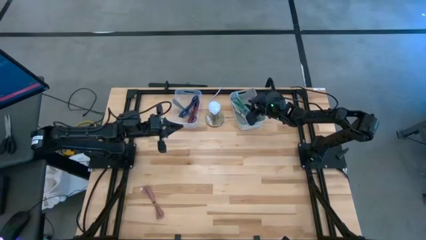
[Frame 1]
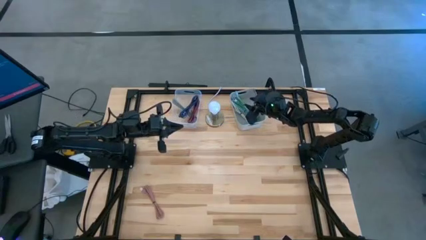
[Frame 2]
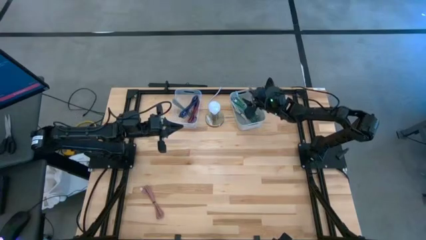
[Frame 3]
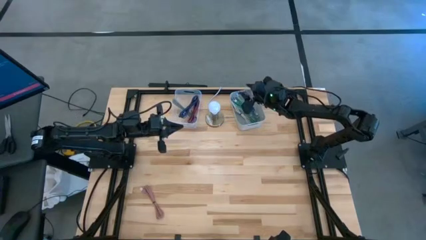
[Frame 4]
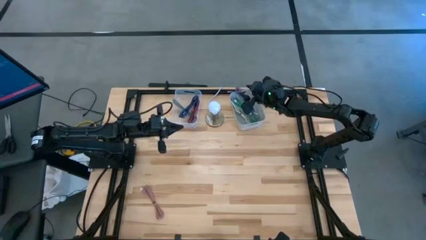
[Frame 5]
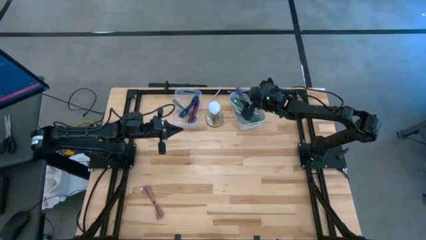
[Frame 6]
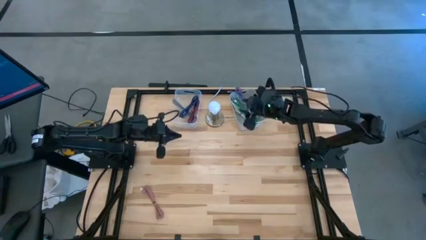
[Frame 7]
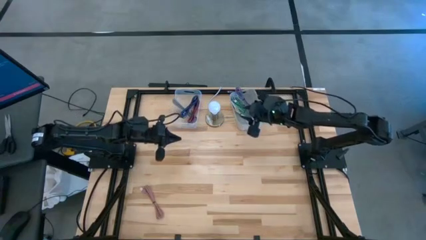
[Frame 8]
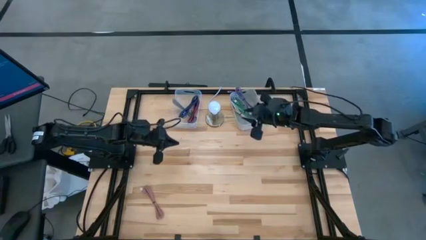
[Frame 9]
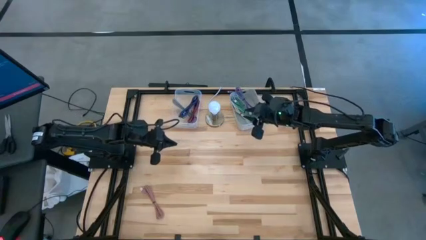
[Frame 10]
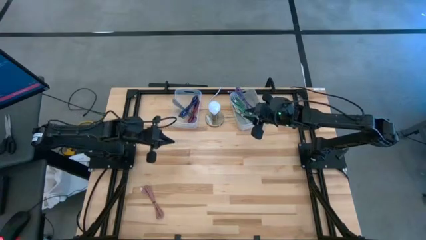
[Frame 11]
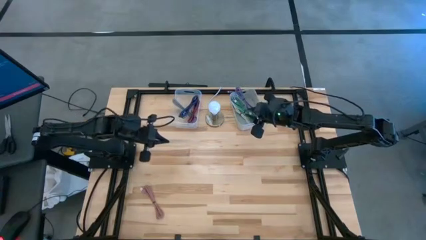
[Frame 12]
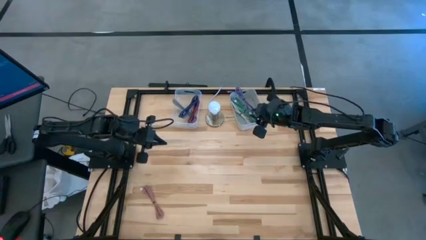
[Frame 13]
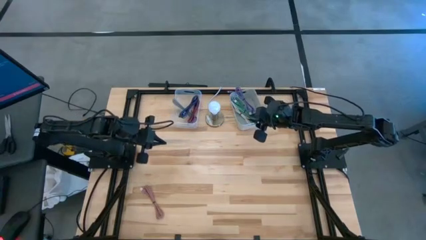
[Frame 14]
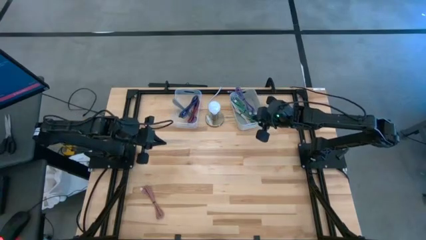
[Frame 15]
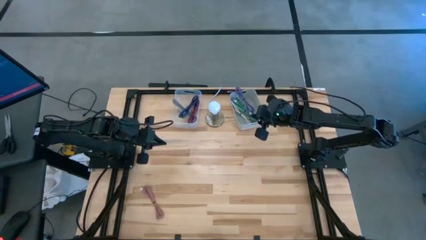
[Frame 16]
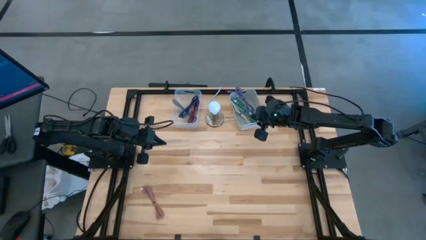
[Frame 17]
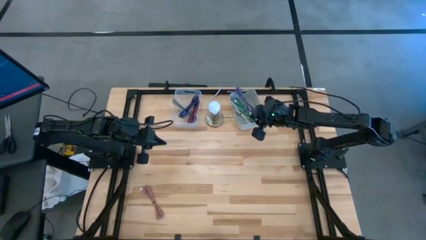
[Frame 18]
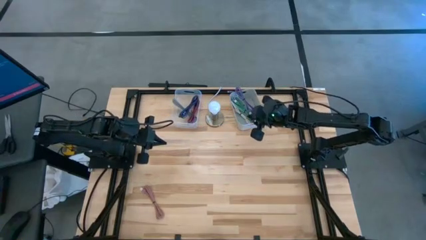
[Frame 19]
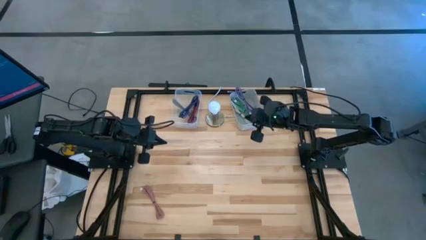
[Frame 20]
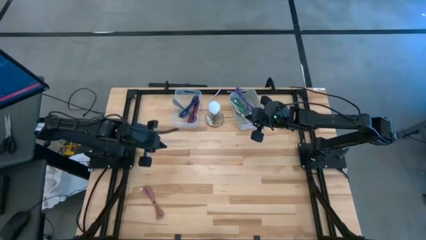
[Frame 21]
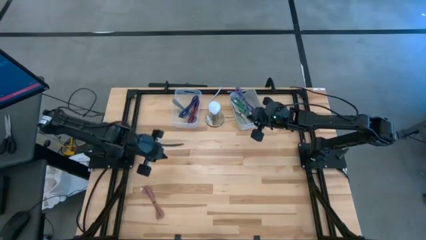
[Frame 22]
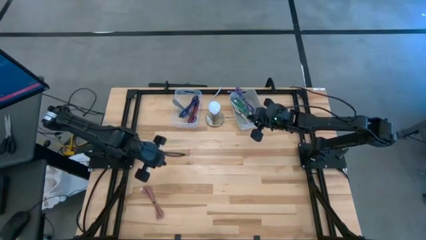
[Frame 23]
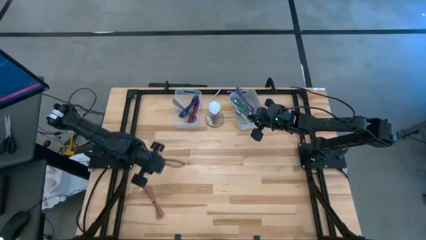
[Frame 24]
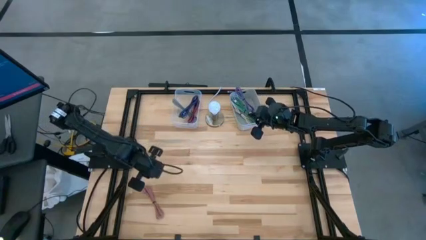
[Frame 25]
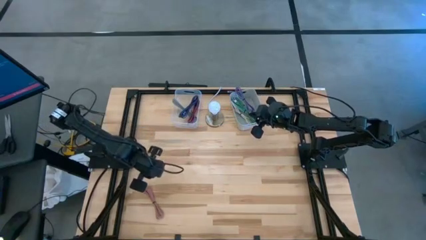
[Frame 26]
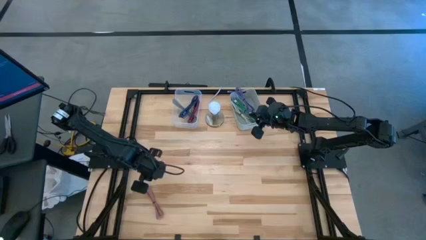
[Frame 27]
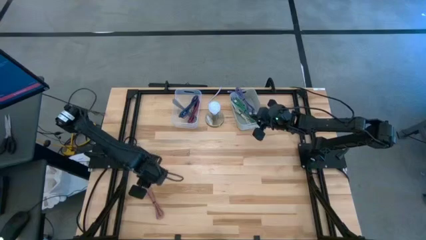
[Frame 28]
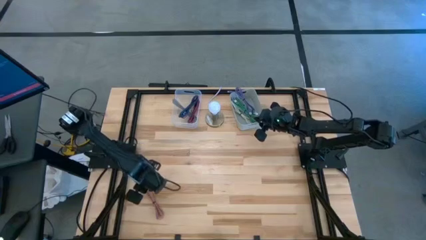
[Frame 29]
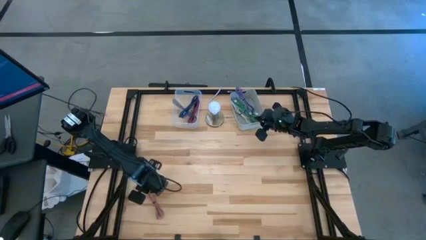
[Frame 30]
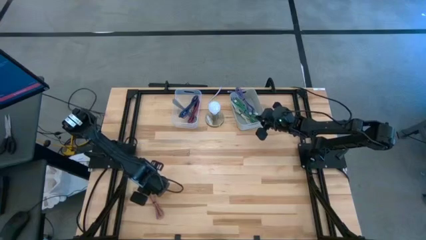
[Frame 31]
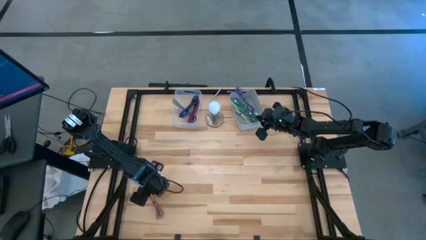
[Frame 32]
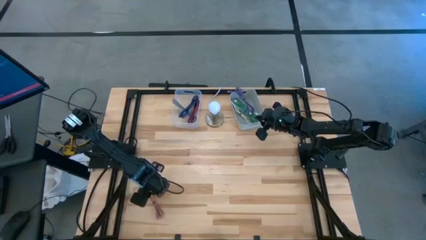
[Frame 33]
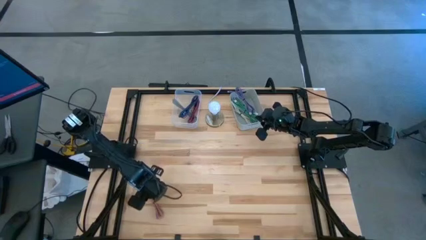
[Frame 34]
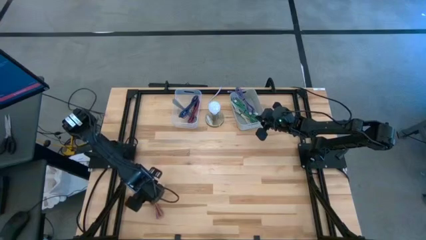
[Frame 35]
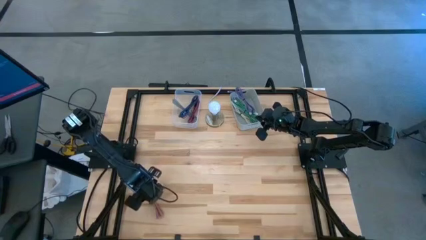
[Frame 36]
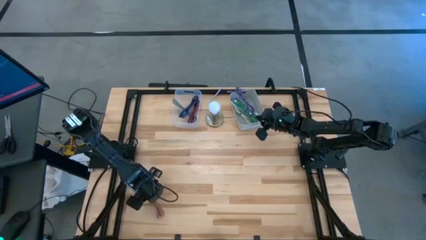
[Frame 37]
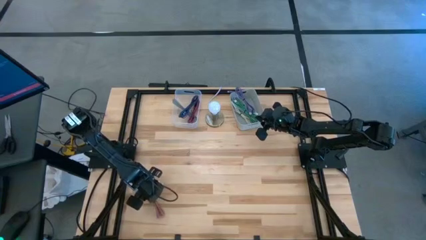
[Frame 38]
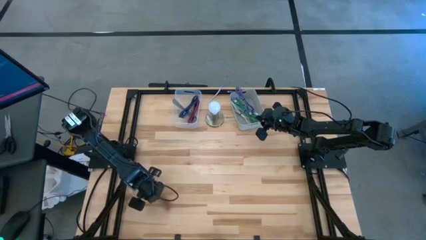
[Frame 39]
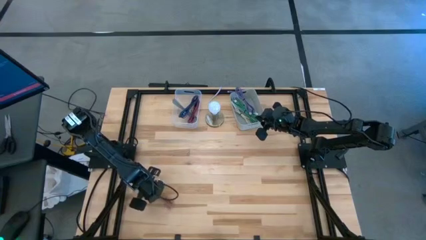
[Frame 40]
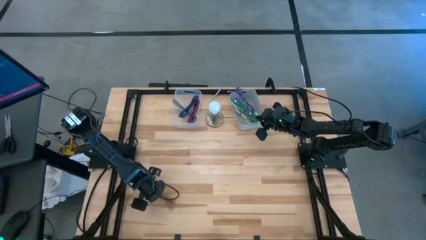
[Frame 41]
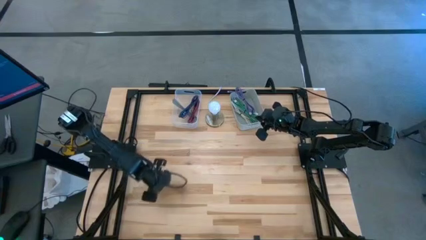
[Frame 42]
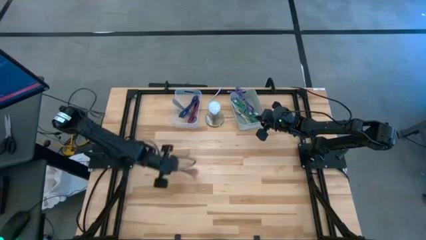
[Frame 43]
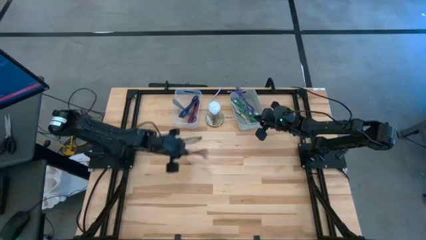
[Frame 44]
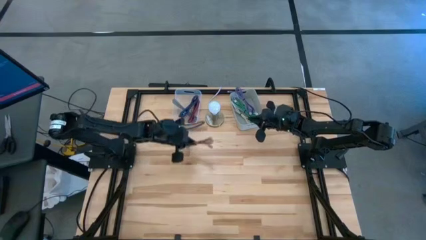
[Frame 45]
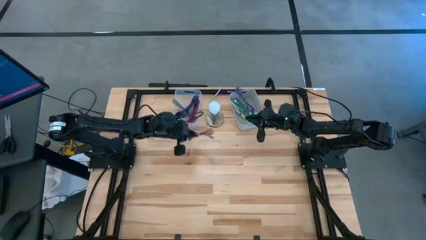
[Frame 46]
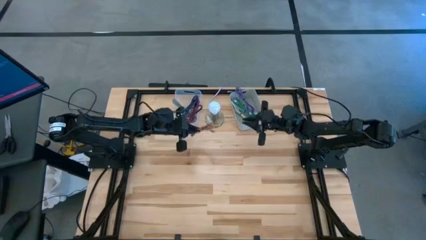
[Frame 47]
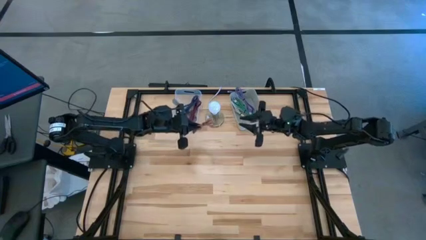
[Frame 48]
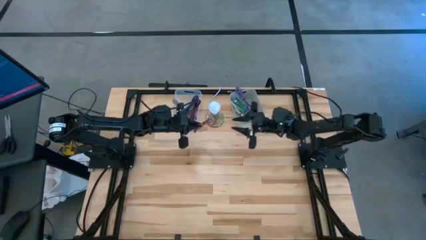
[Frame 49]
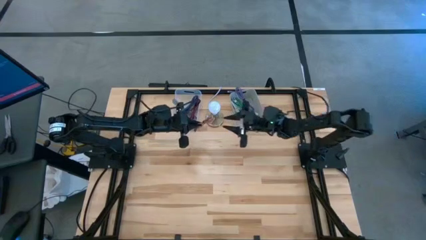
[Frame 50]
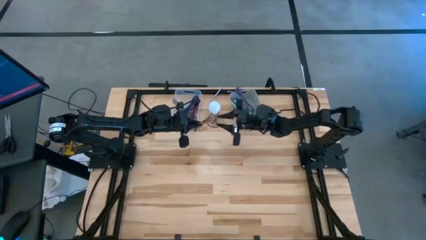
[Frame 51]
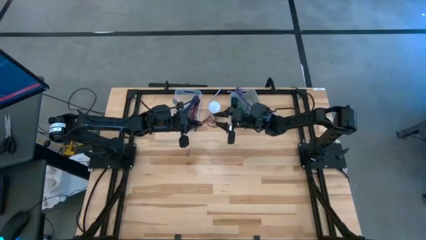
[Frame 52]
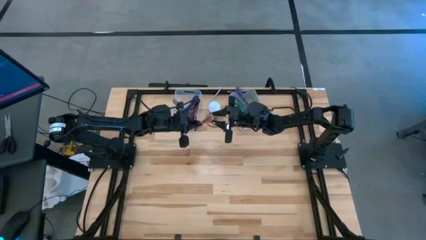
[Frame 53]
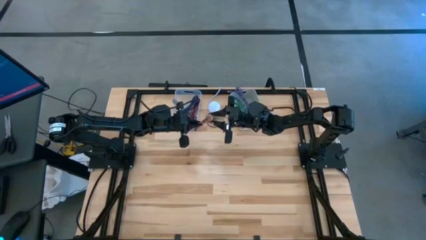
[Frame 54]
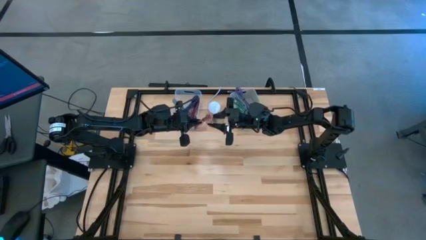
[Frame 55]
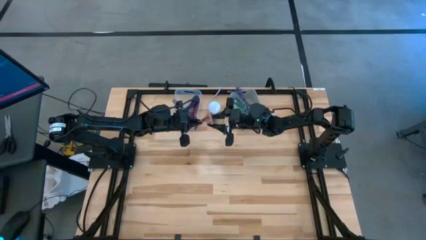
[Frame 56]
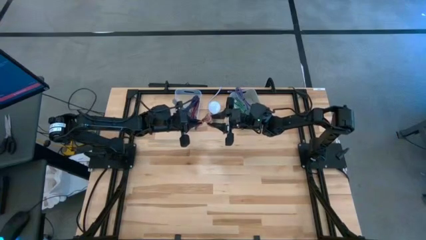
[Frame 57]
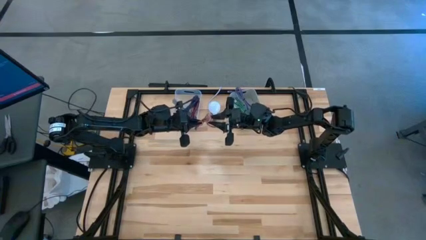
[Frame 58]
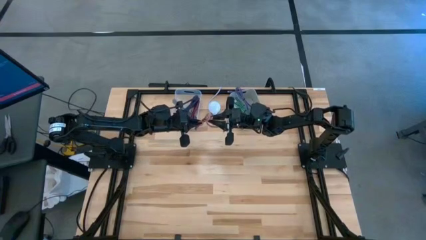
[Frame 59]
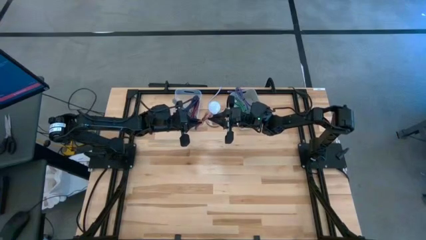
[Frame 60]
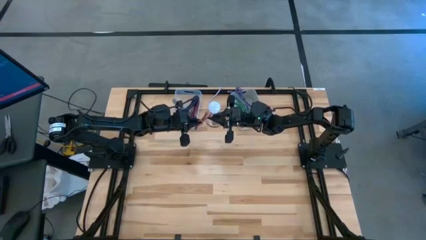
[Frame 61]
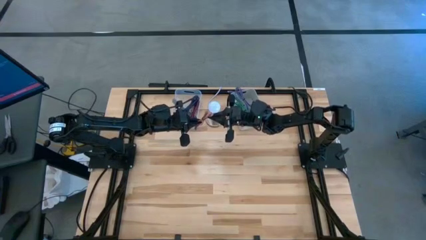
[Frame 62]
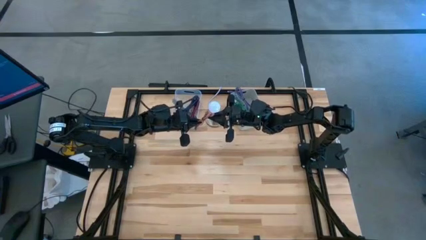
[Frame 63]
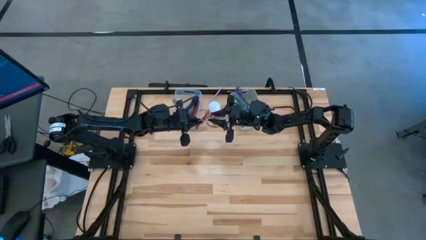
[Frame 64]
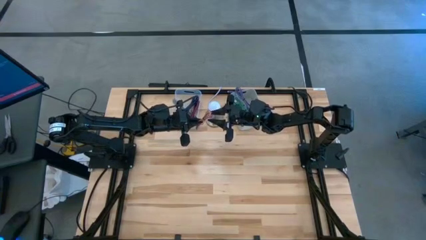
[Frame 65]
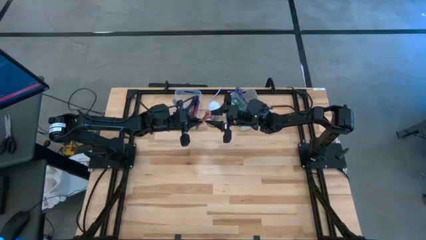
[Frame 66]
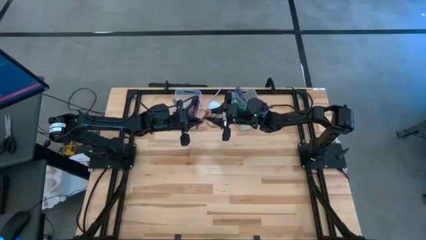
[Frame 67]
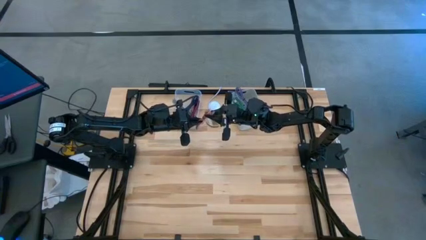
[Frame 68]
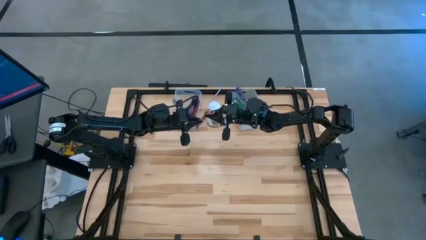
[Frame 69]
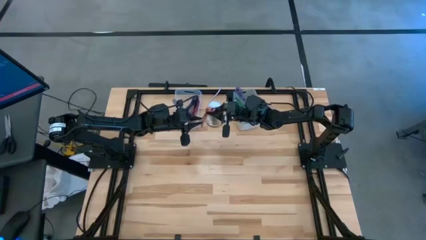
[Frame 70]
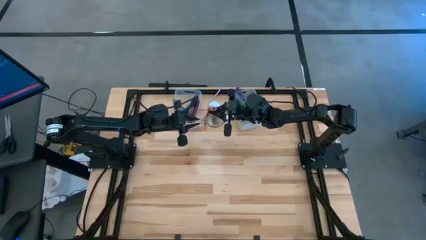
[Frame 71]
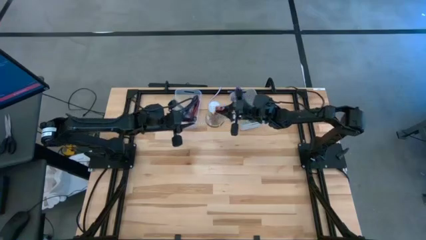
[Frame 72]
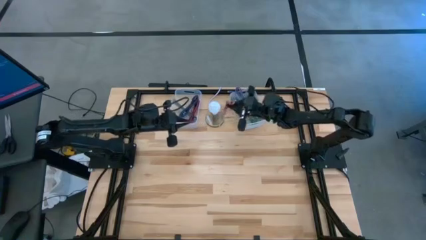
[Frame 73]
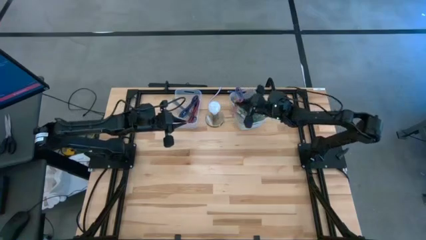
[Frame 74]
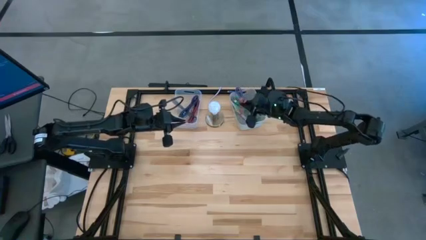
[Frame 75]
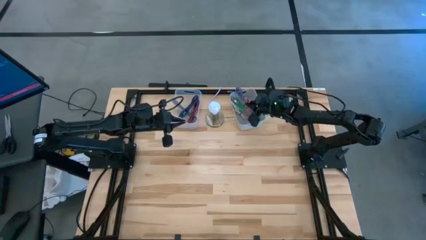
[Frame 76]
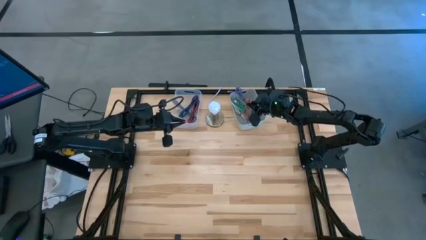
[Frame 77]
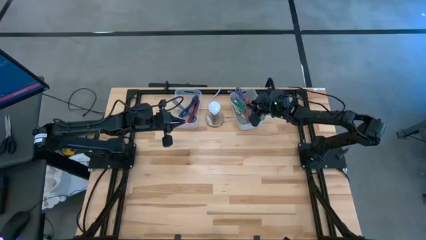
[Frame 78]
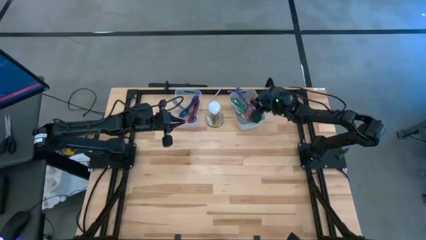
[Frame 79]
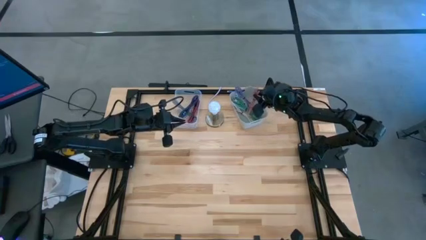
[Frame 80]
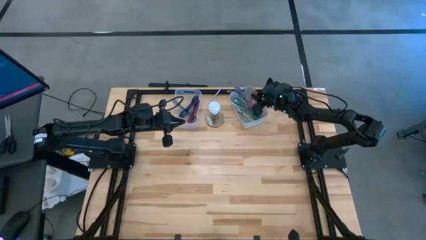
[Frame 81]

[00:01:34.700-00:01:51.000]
Task: Pick & Place USB Port
Put the pink charger cable into the gray bin

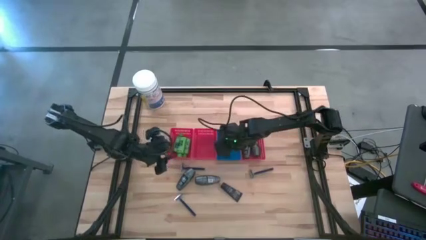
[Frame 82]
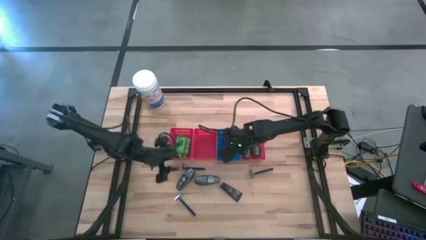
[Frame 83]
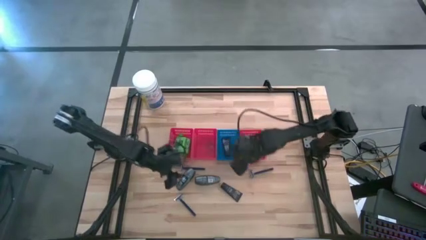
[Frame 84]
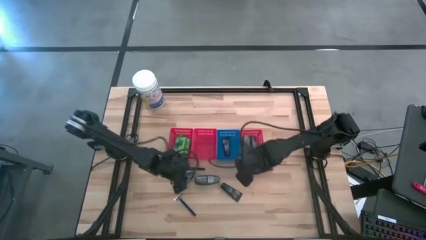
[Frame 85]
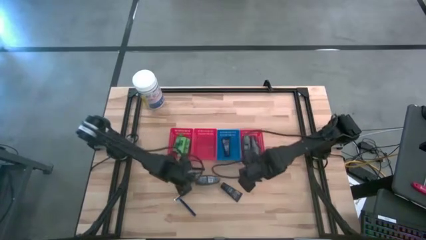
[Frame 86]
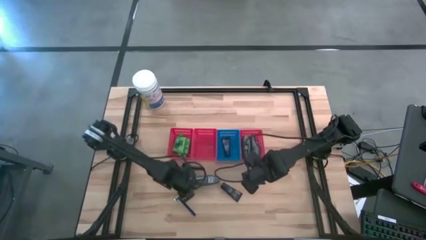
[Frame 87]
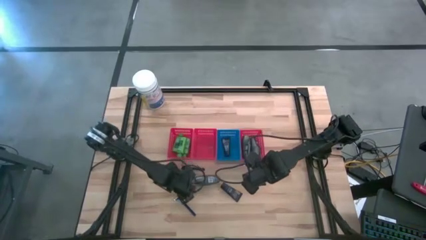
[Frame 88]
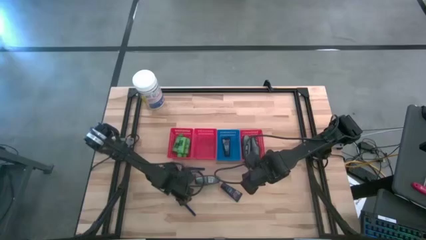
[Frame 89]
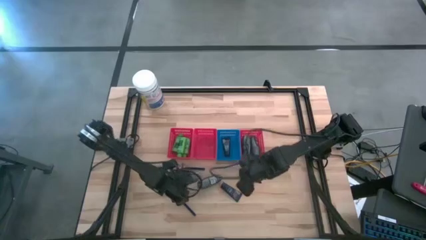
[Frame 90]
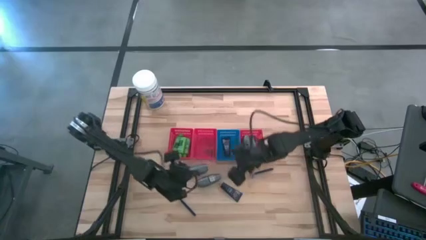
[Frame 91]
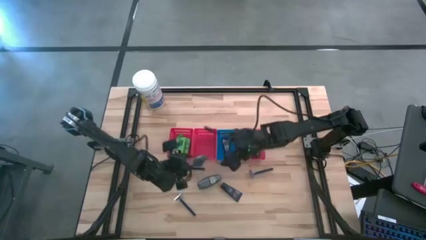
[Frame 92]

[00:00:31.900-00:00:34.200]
Task: Pick & Place Travel size toiletries
Put the black deodorant into the right red bin
